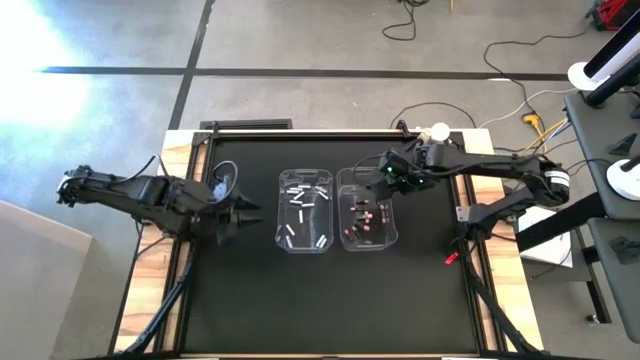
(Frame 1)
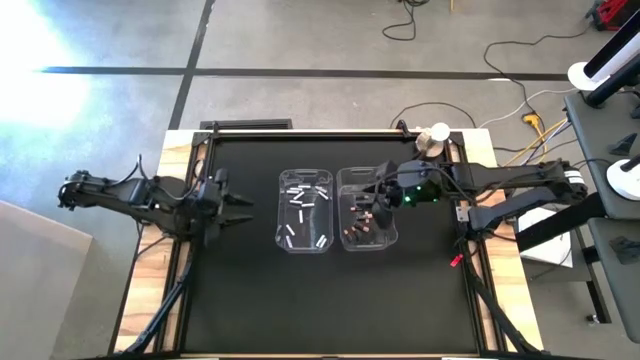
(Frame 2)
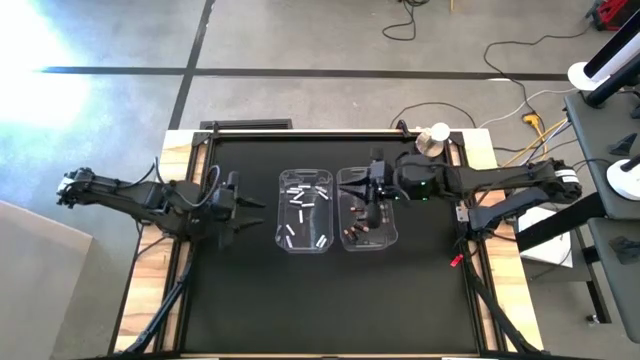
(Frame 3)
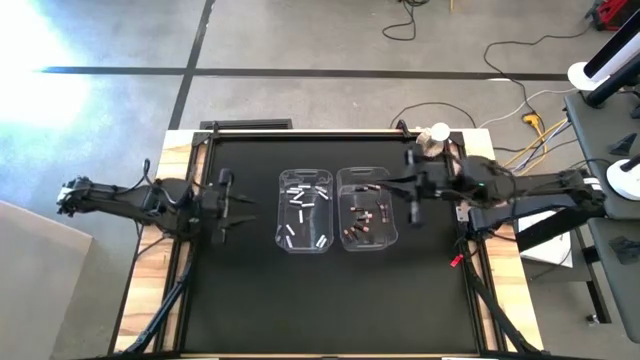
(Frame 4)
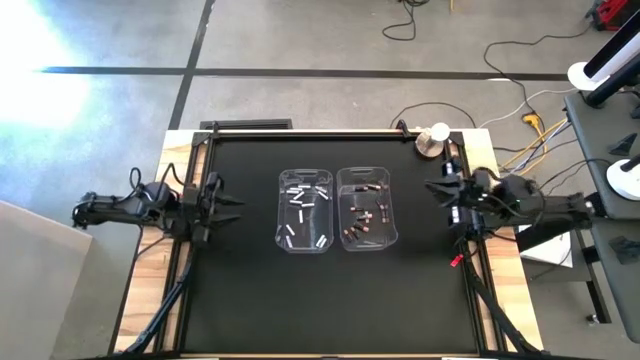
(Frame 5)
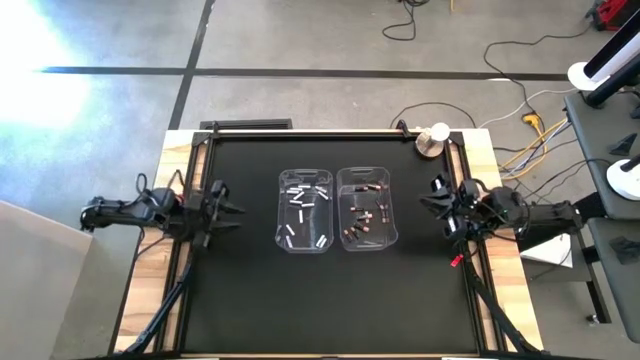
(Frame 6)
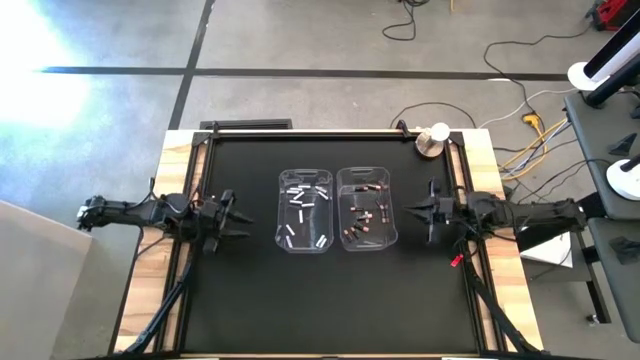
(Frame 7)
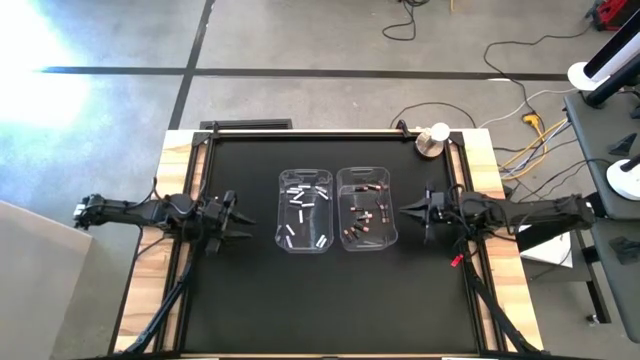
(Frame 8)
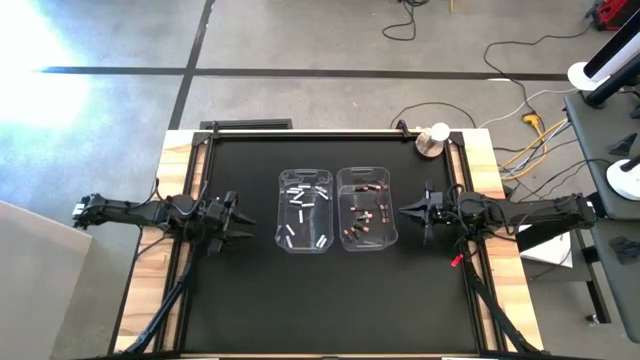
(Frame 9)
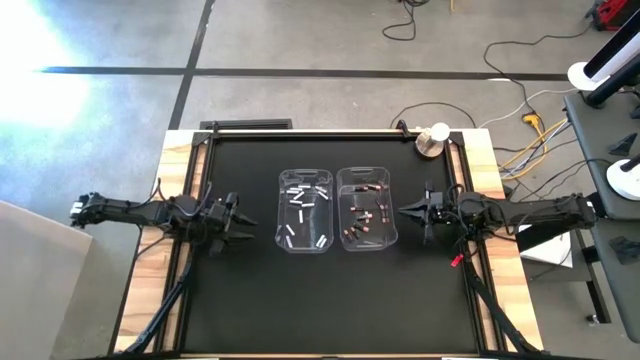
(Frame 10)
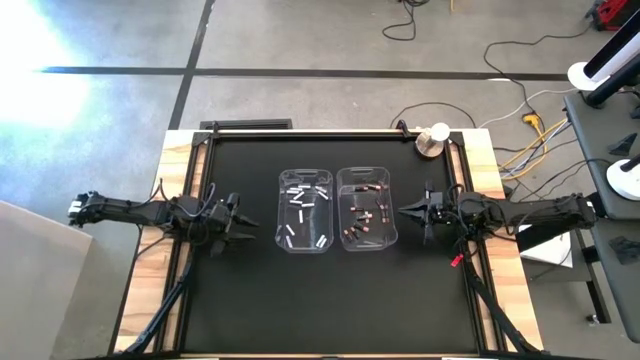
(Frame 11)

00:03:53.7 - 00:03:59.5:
Task: Sort batteries
Return to Home Position

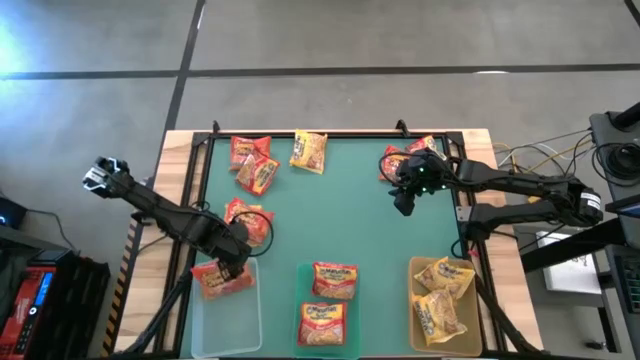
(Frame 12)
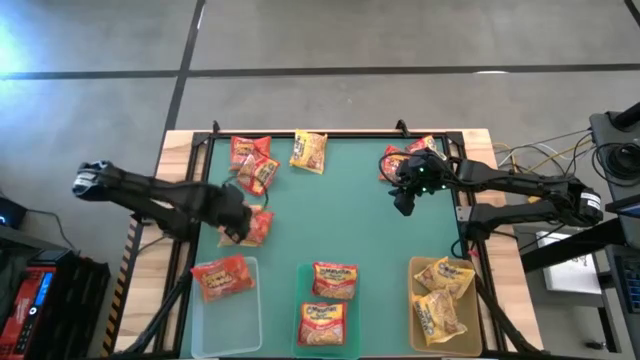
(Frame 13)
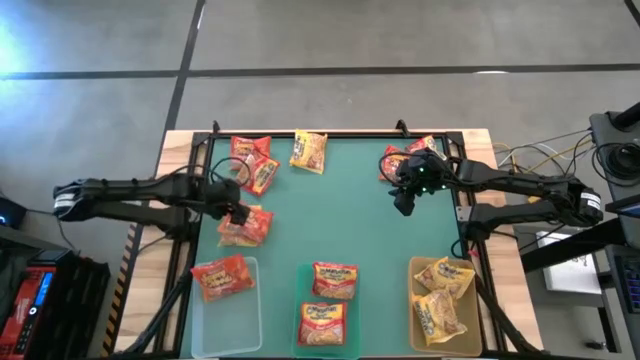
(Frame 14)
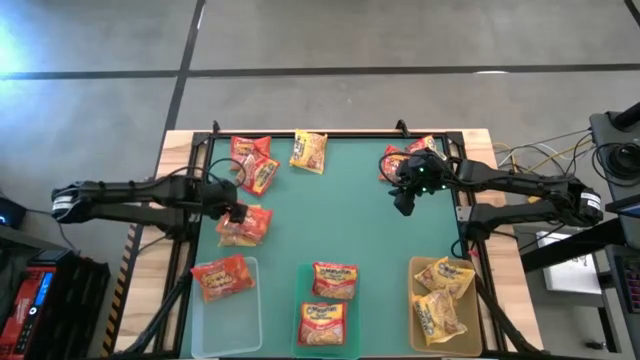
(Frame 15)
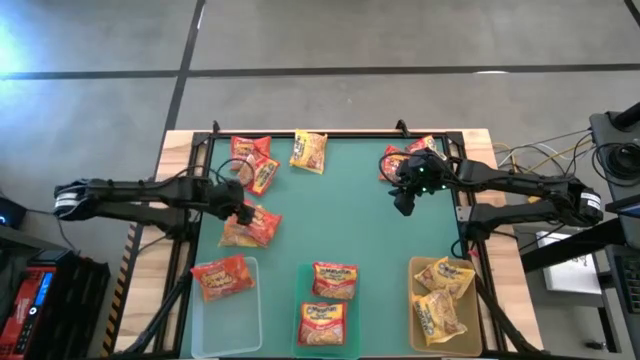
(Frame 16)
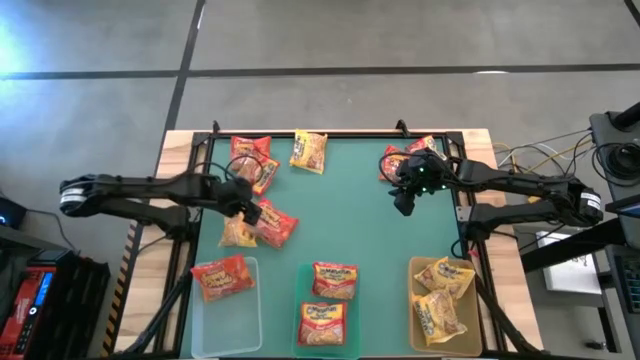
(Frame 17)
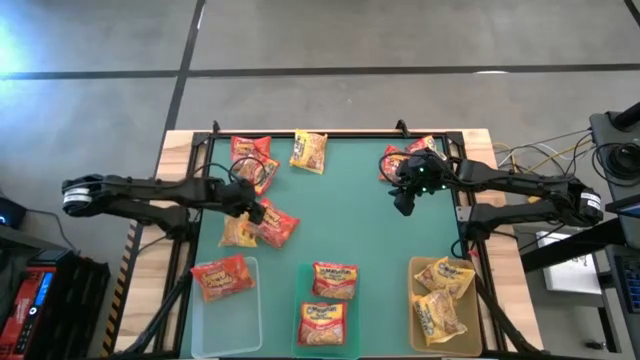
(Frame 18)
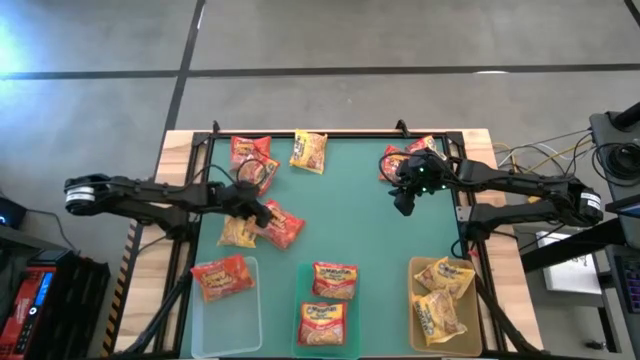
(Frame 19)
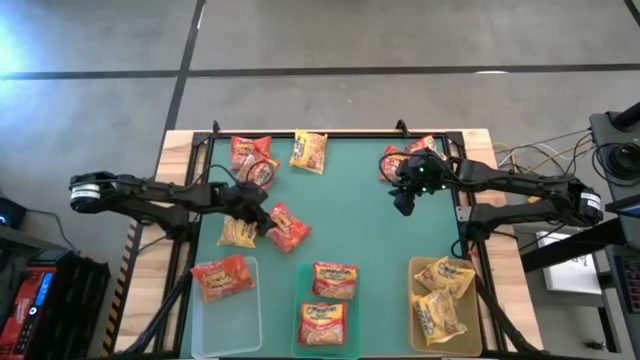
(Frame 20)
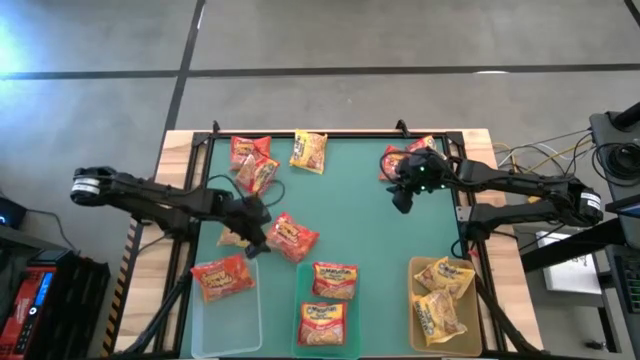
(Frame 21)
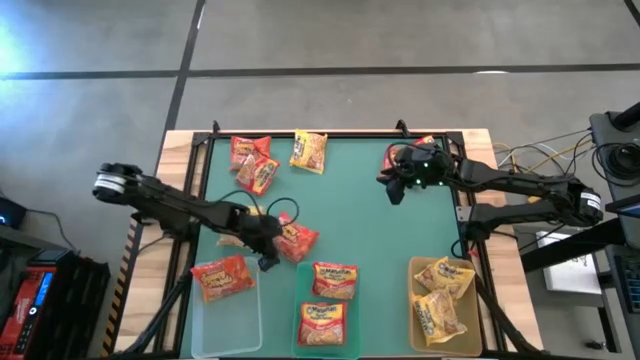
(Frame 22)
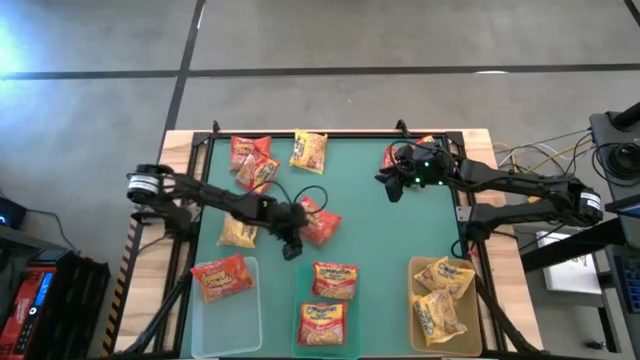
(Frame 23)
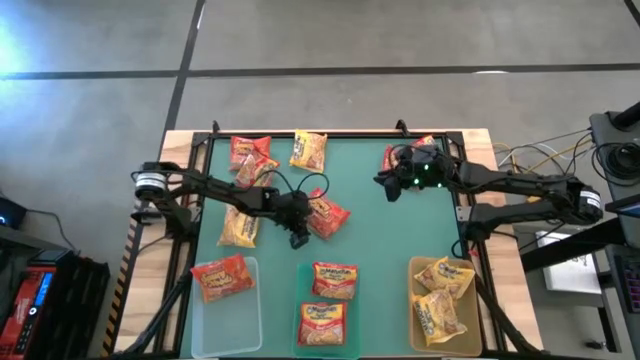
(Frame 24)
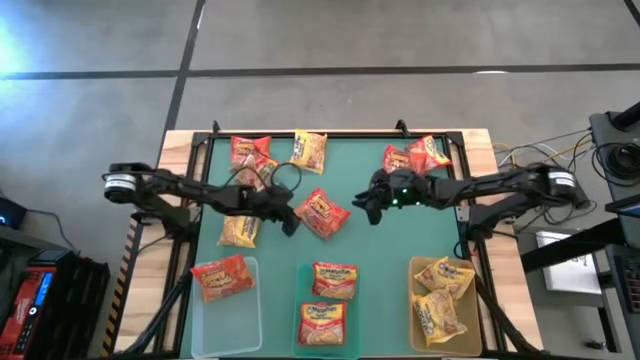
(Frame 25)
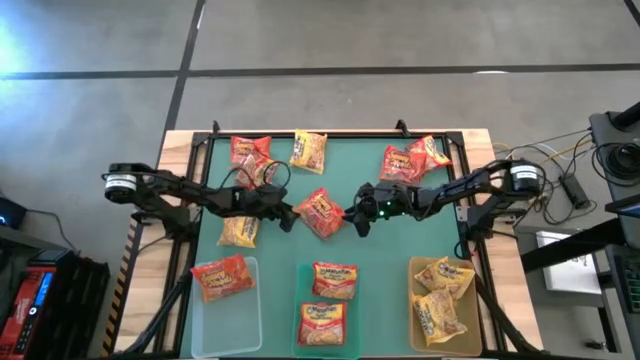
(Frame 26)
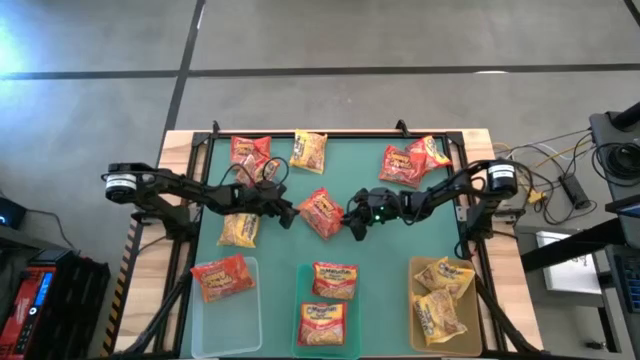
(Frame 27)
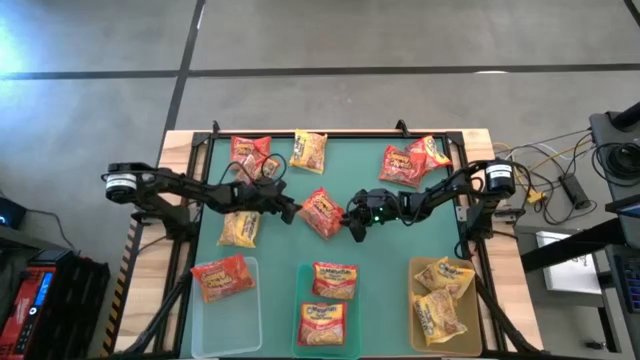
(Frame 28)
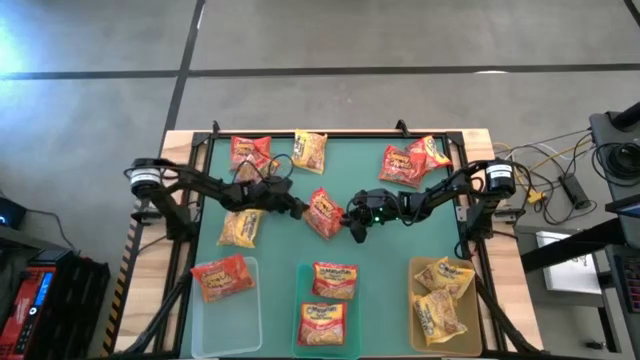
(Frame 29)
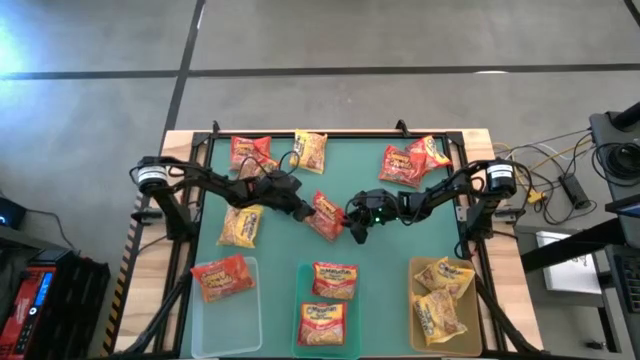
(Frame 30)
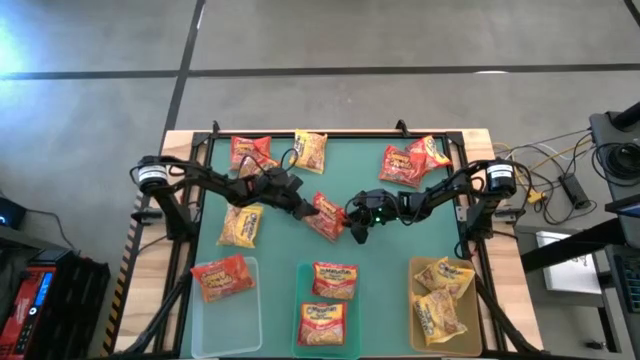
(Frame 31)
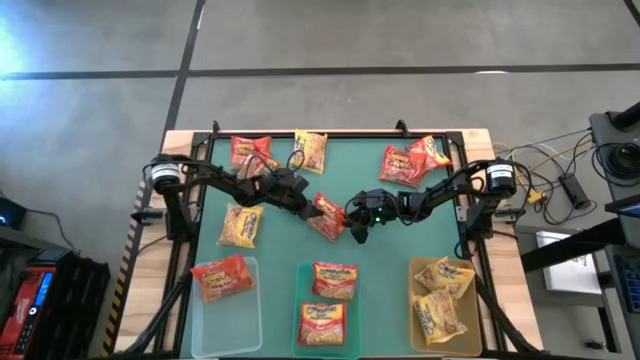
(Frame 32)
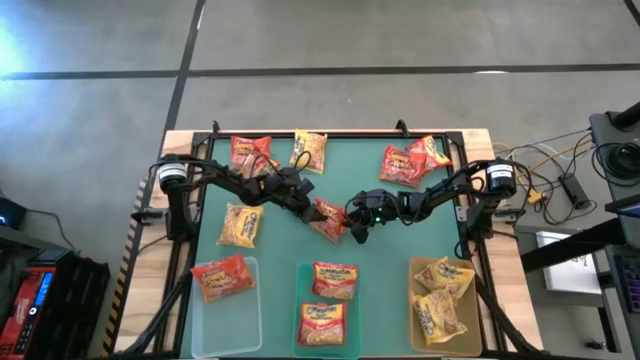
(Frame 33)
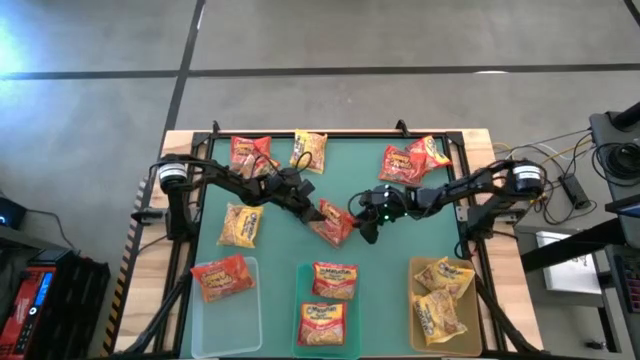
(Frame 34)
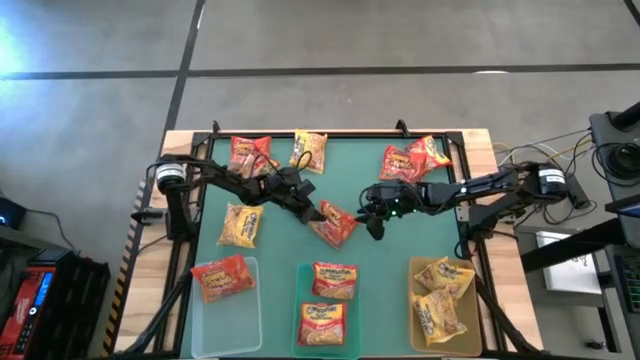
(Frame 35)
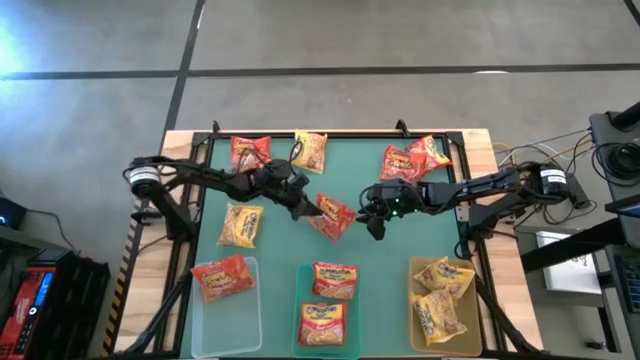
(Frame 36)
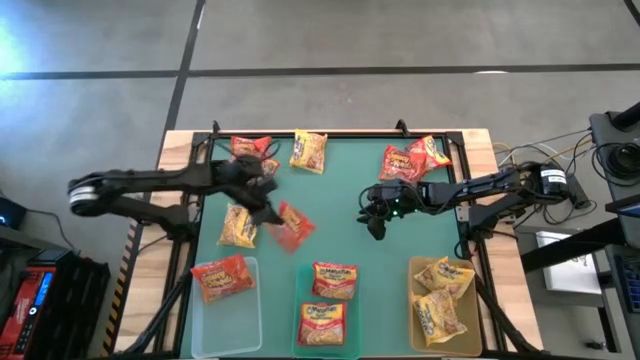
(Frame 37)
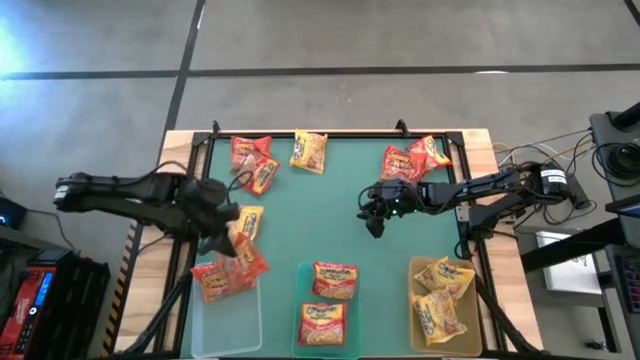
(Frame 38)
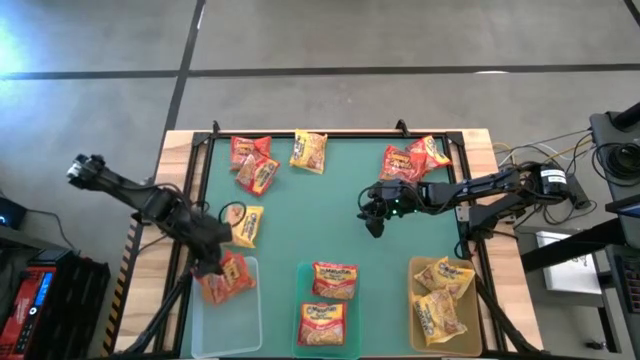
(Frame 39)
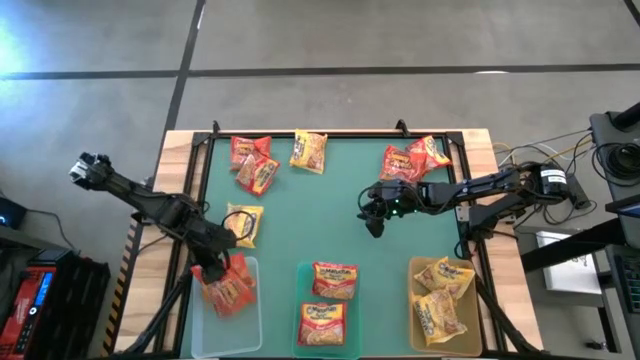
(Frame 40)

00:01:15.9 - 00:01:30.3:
Task: Sort Maruchan noodles
Put the orange noodle pack into the transparent bin
